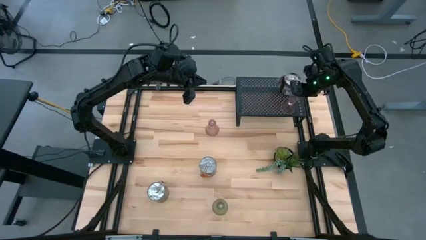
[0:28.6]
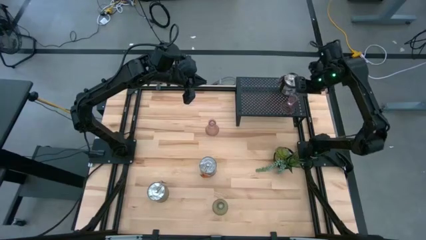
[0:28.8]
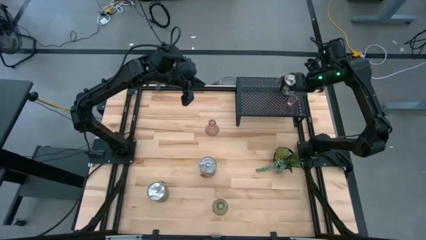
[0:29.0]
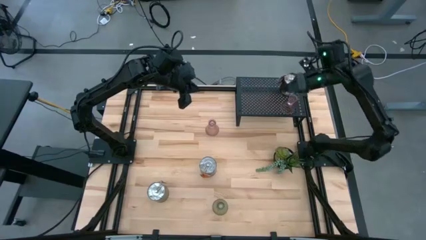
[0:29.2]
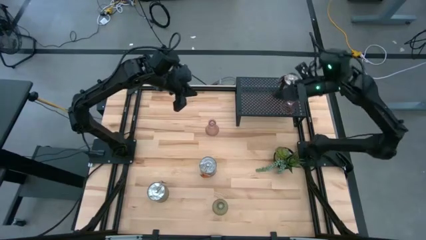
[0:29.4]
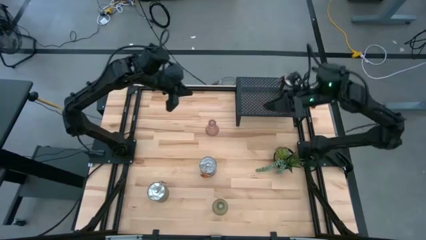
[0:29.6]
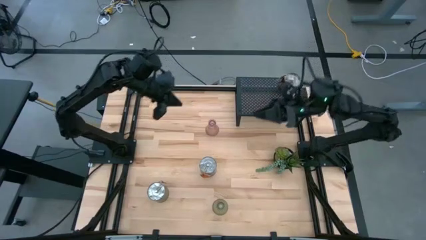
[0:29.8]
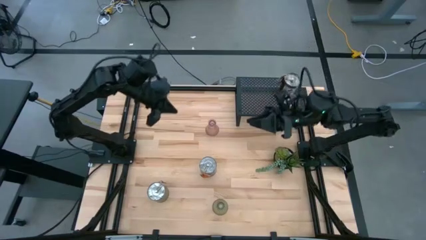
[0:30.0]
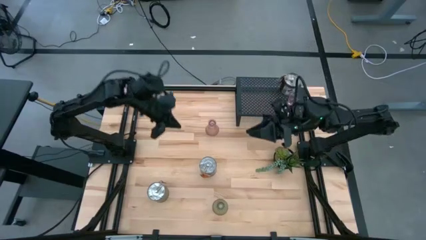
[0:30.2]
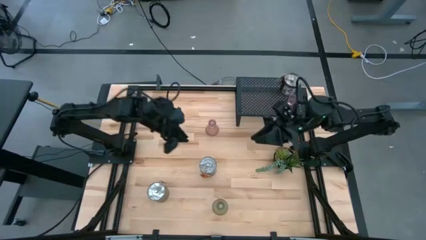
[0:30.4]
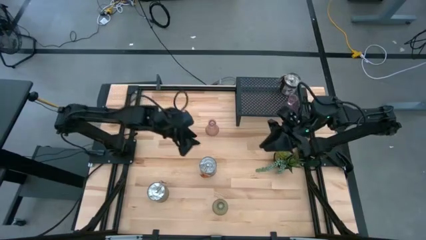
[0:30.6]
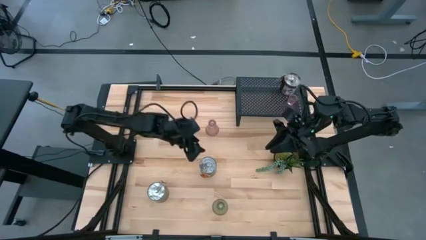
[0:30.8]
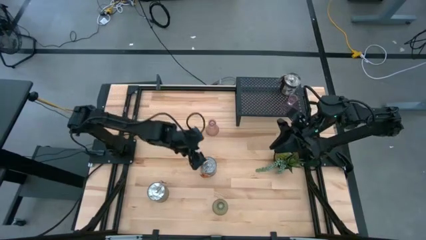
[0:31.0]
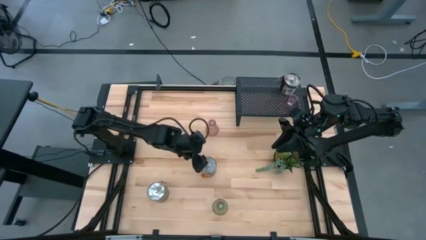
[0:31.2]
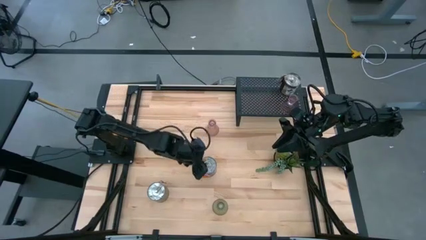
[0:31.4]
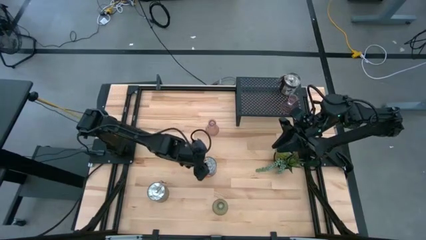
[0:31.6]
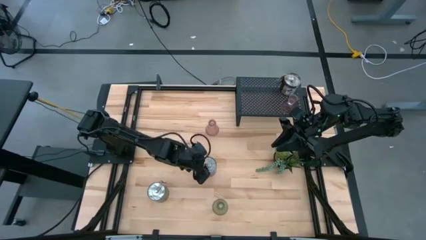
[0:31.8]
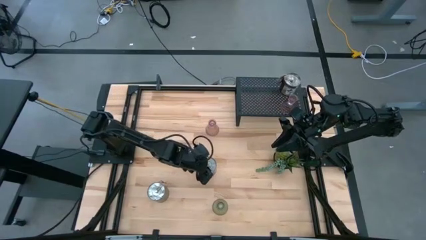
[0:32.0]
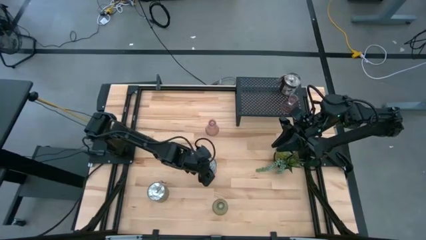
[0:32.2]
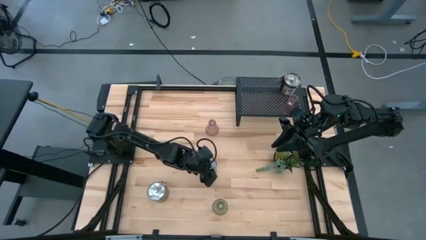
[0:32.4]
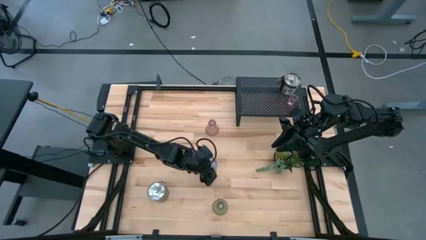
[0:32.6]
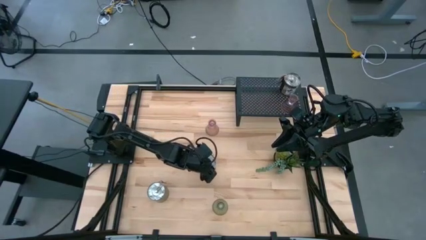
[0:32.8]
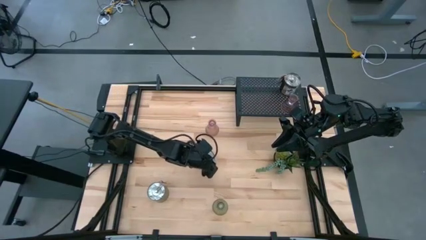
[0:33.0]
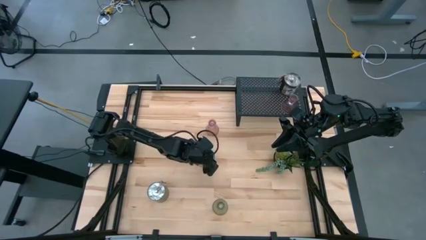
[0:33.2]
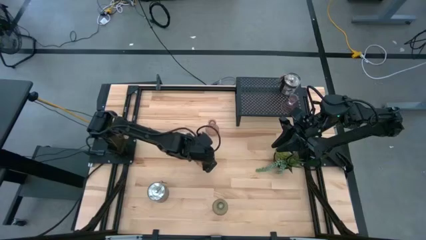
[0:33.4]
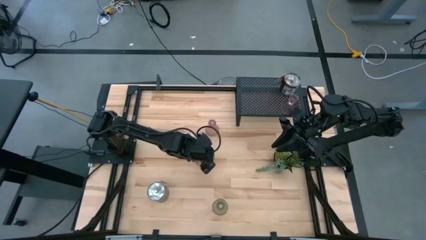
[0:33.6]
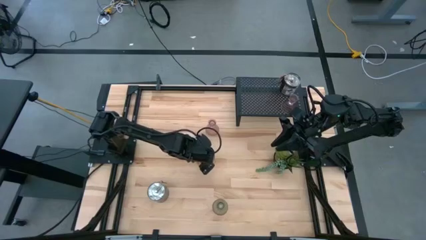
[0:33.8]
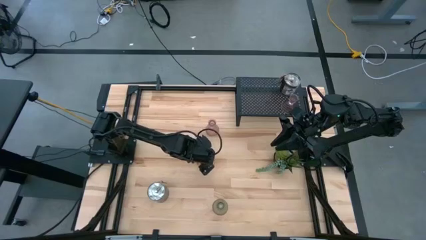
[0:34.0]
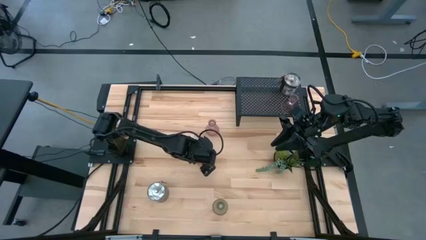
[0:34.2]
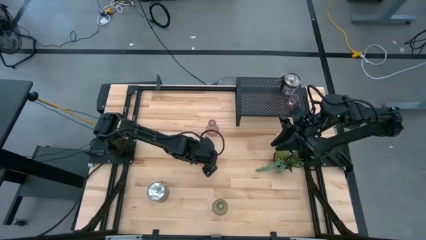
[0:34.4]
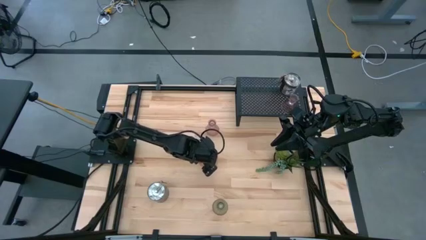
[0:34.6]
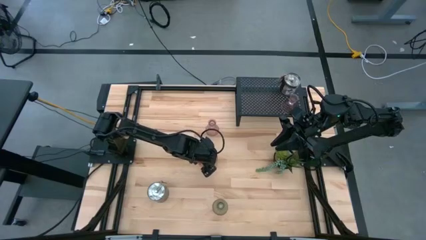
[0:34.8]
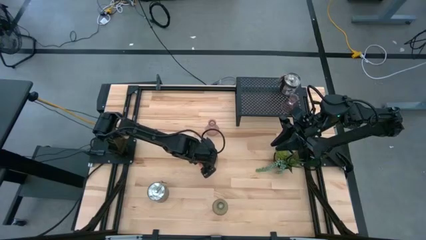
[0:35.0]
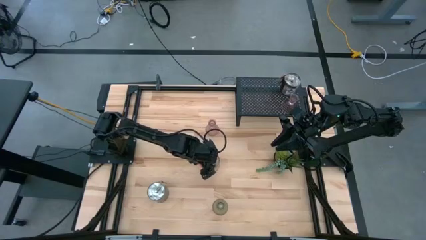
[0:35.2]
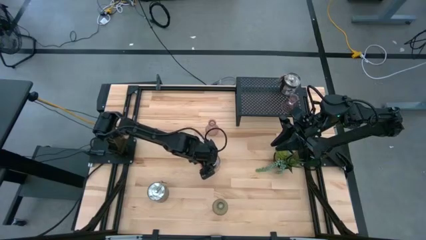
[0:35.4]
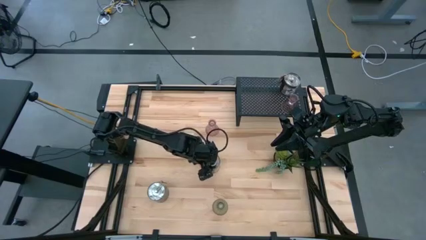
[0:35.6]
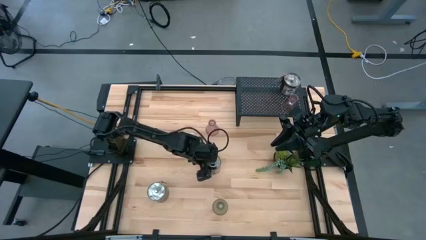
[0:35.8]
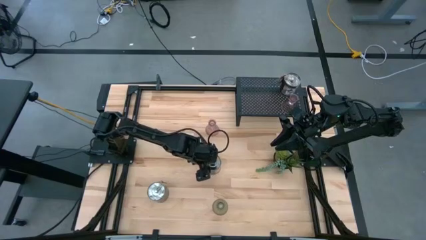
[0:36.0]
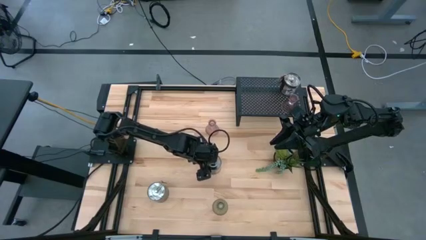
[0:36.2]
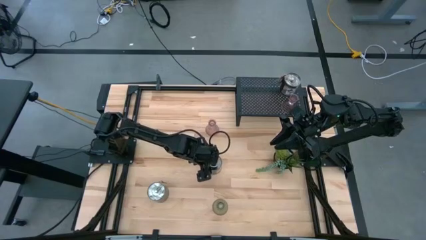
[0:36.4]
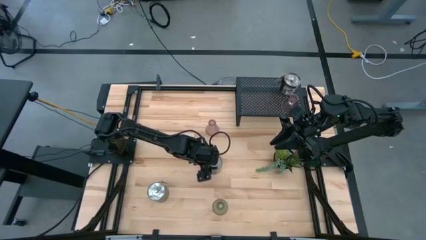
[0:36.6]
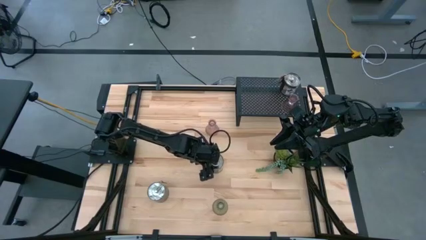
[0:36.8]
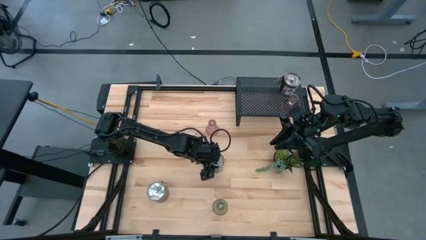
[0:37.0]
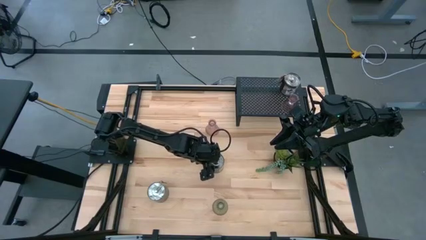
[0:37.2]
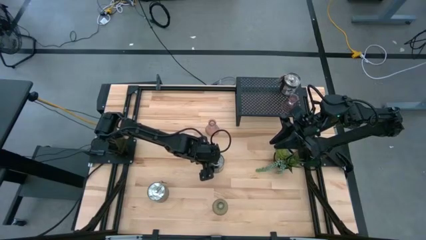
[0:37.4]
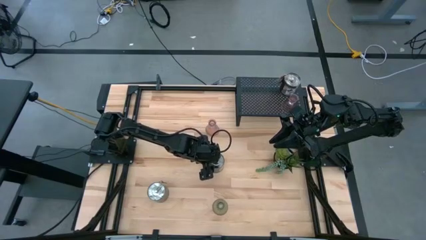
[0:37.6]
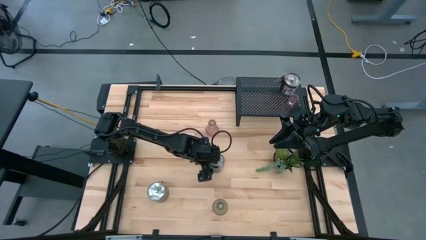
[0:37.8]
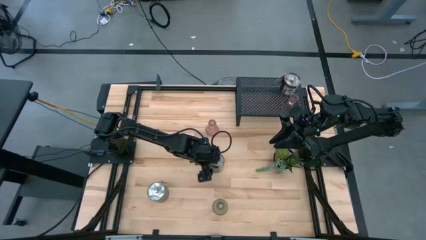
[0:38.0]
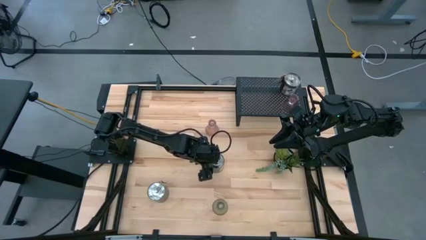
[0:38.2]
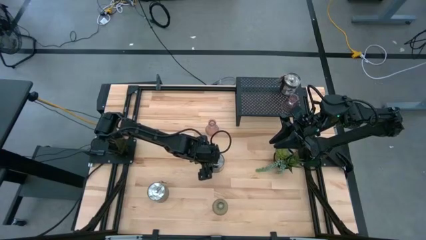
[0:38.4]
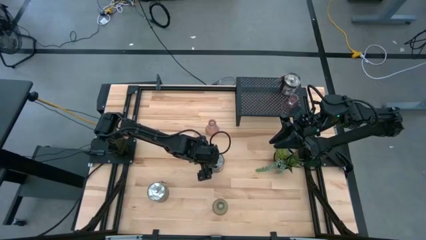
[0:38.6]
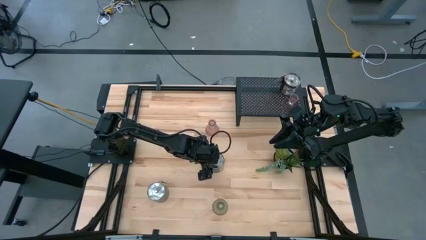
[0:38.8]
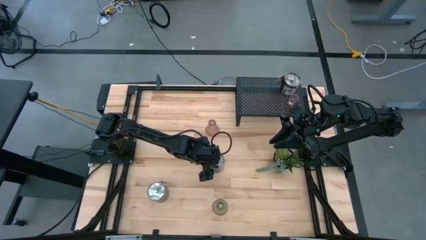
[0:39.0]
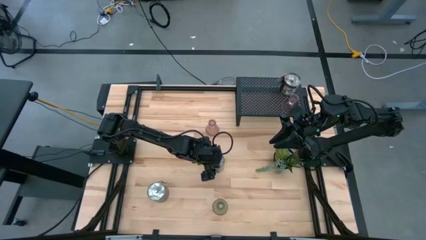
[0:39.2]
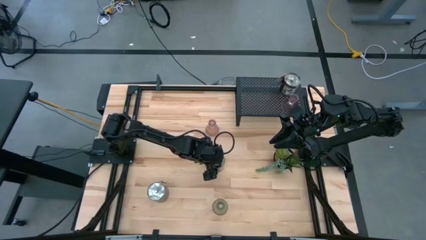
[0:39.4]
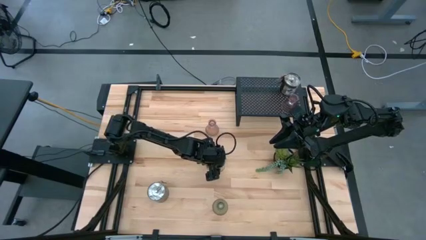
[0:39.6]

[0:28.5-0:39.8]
Task: Pick & Place candle stick holders
Put the top silver scented candle on the shelf aligned with the silver scented candle
